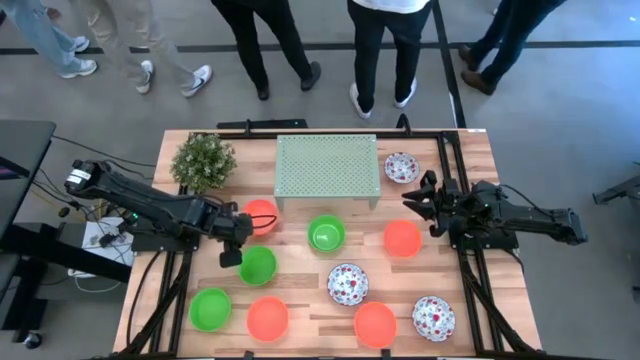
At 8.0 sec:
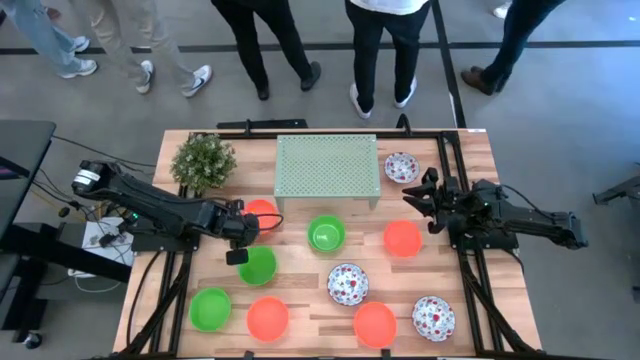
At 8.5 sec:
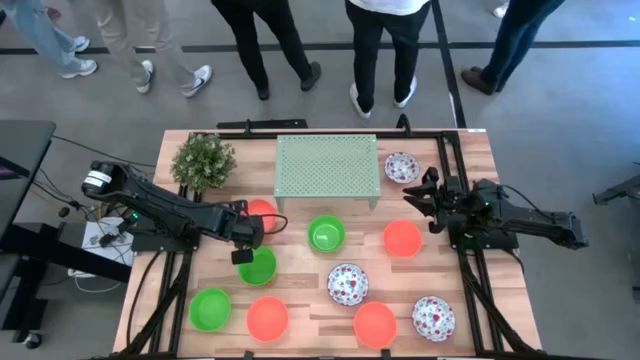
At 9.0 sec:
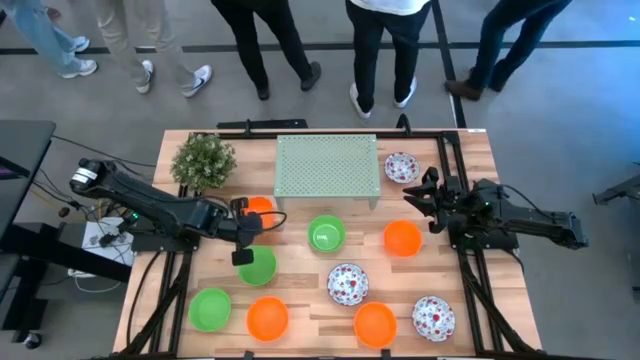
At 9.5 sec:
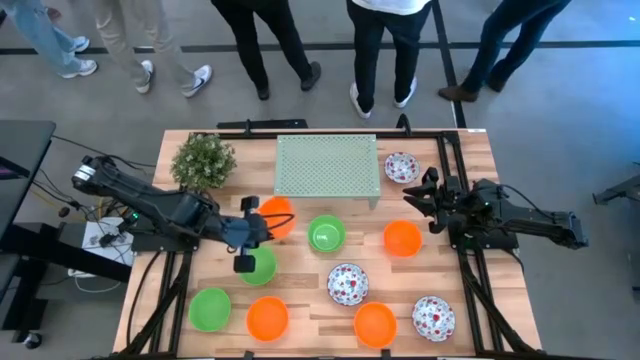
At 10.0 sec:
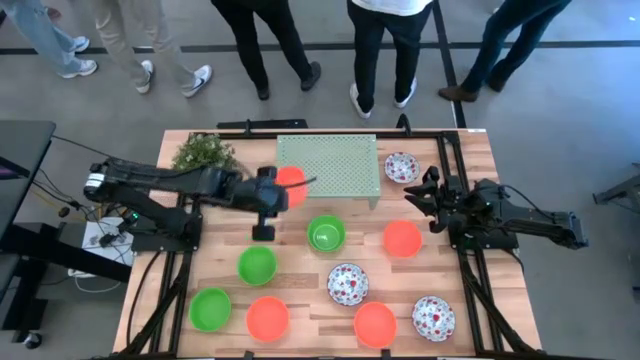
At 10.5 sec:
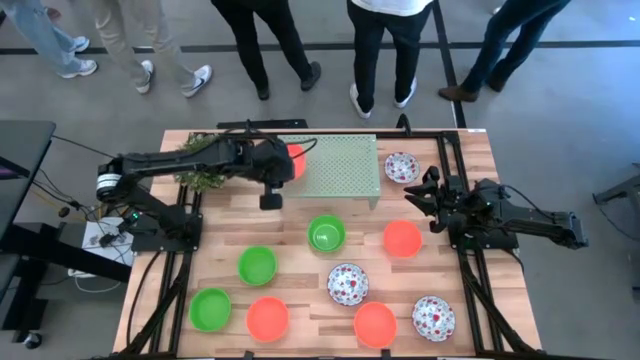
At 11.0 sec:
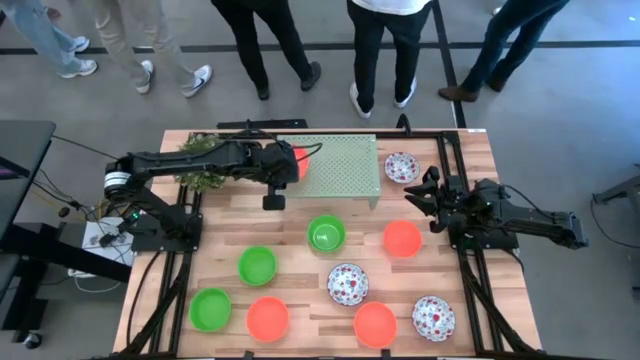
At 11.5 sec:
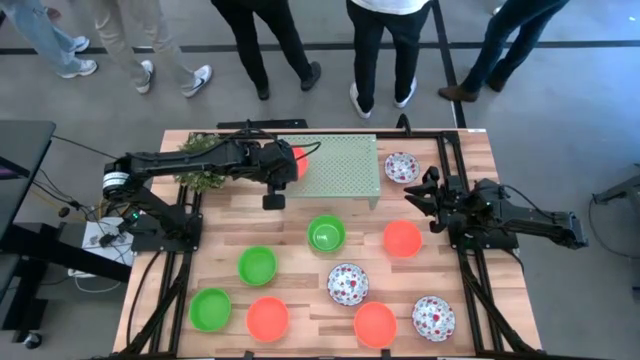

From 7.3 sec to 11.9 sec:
Task: Pick & Place Mini bowls
Put the orange bowl on the shelf

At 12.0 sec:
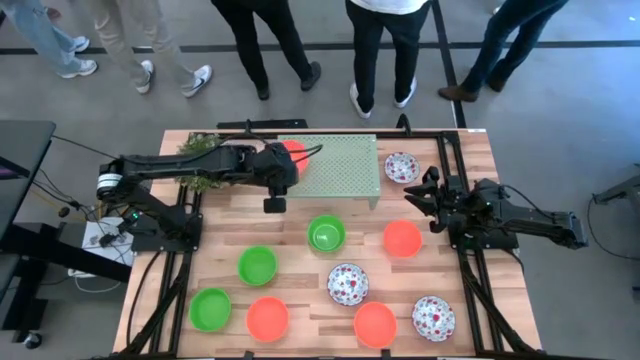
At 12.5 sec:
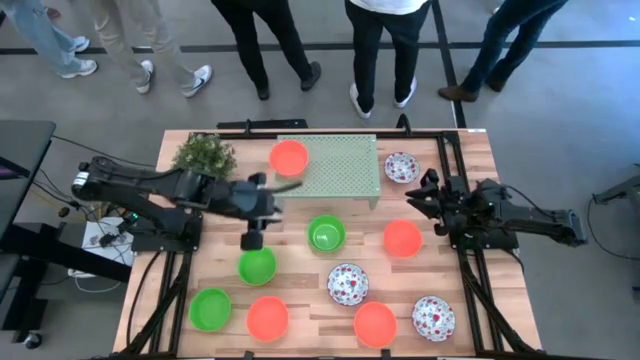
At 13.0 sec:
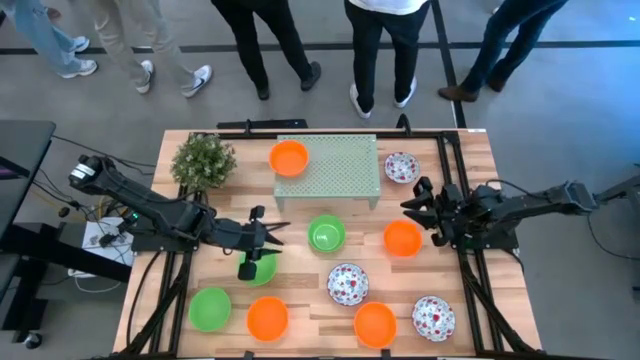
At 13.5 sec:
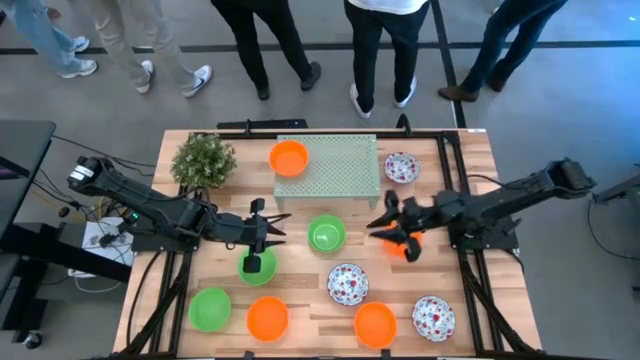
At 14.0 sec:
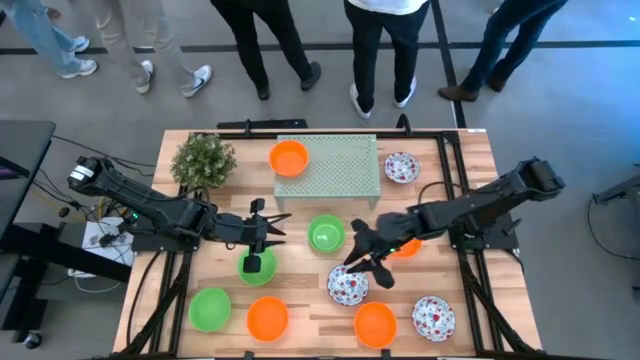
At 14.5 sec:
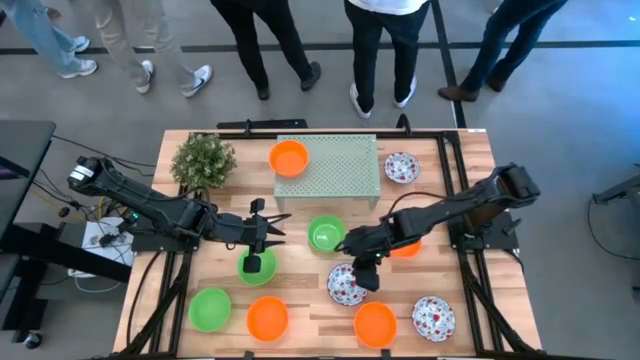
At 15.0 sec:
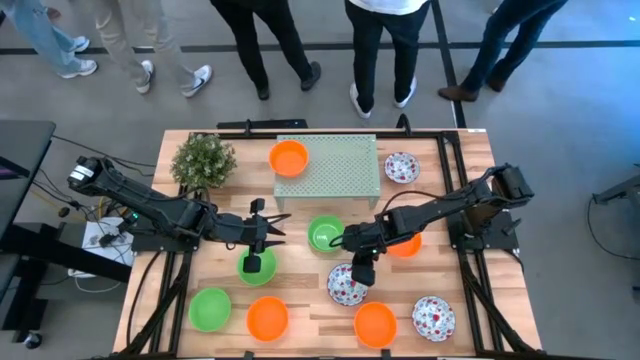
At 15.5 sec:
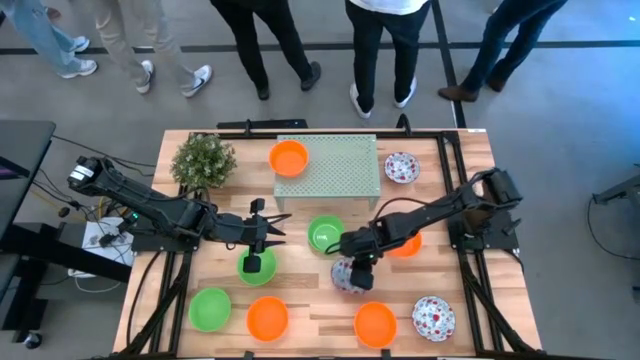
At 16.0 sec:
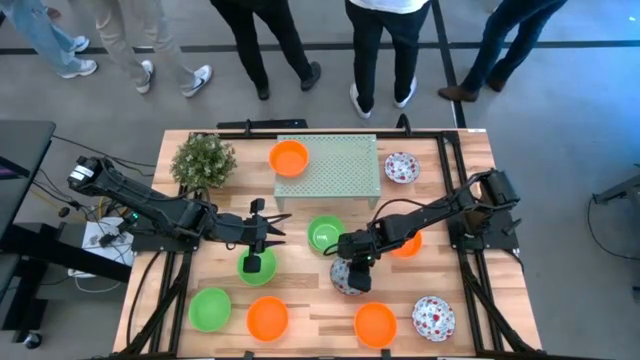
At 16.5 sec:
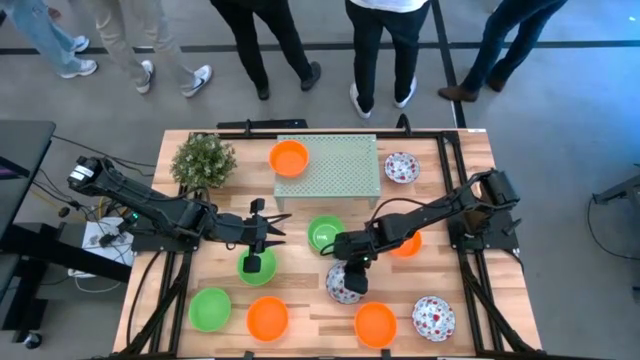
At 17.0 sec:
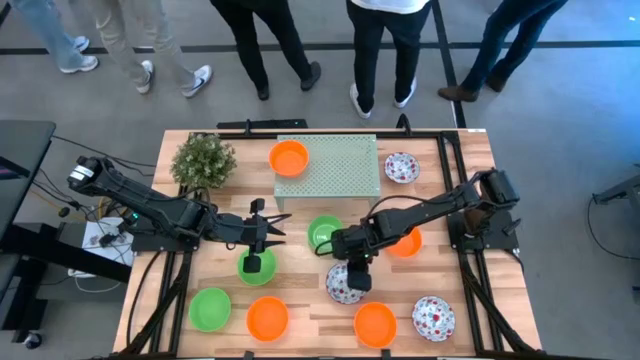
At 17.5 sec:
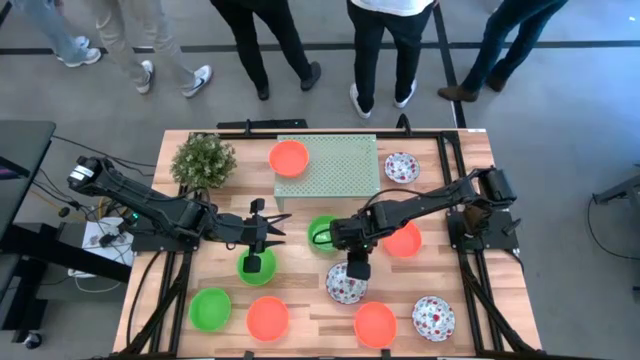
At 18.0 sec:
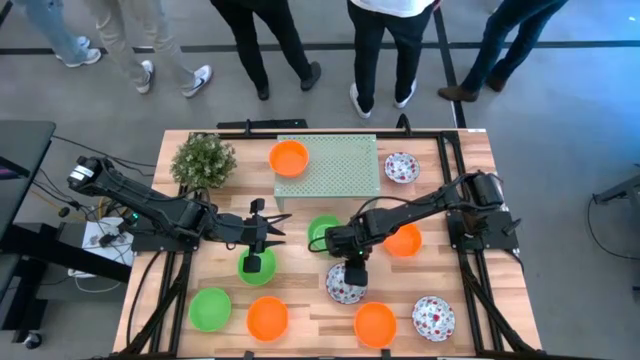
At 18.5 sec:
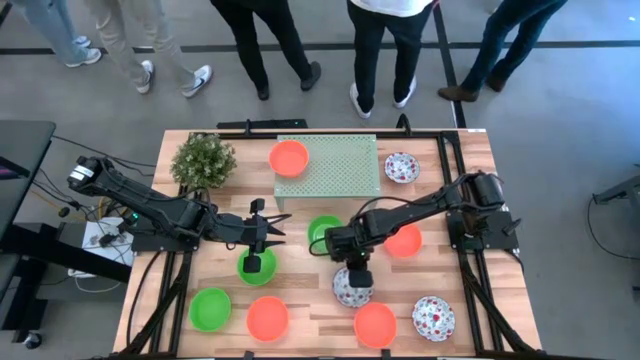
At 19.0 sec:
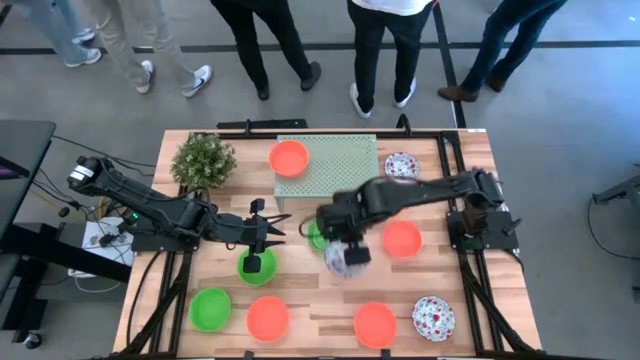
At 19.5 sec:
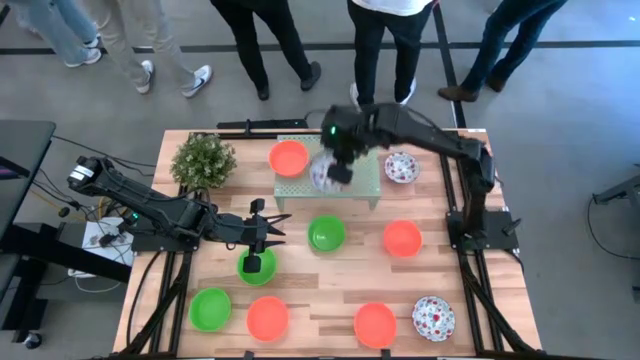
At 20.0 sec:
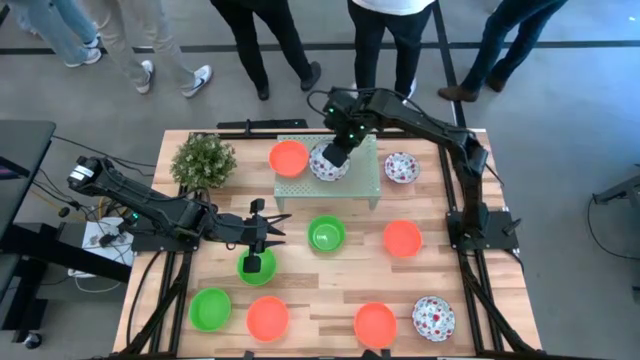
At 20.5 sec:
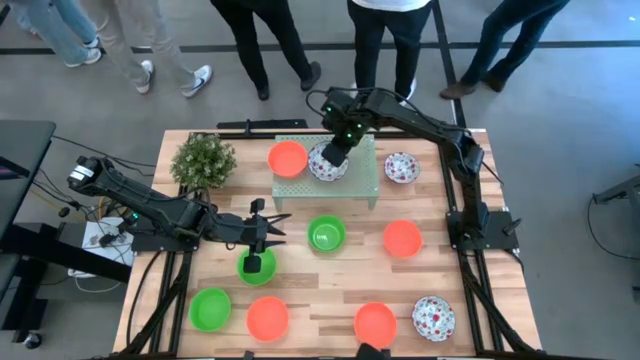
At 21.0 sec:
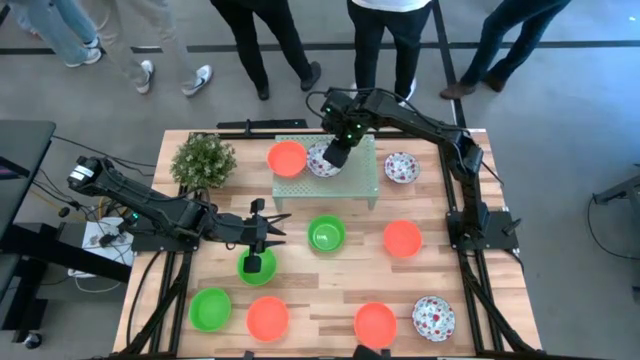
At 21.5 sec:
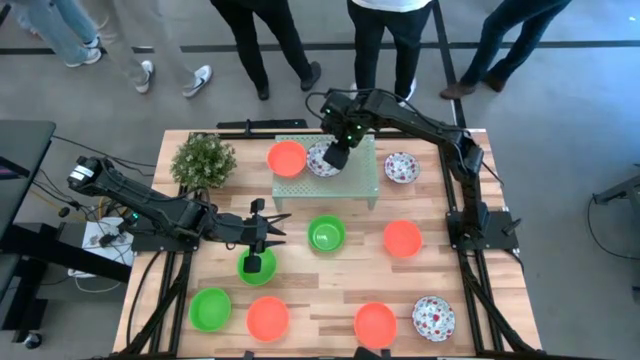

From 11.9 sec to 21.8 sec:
Put the left red patterned bowl on the shelf

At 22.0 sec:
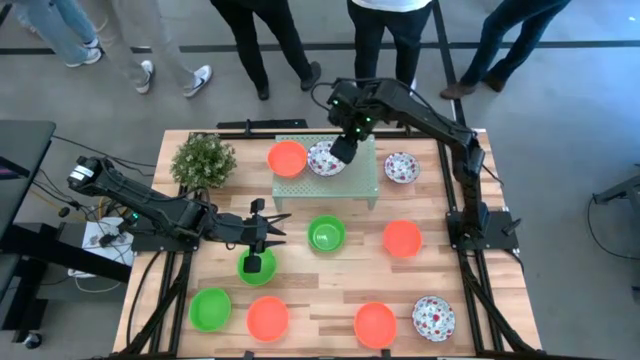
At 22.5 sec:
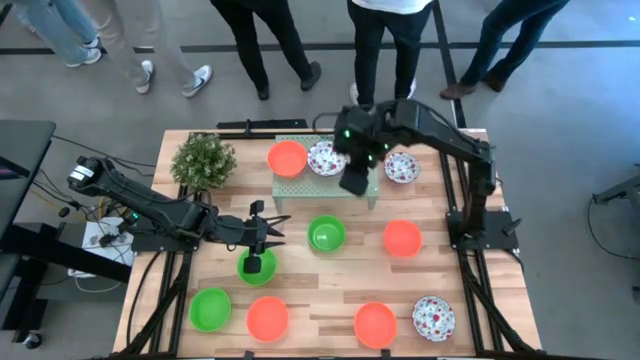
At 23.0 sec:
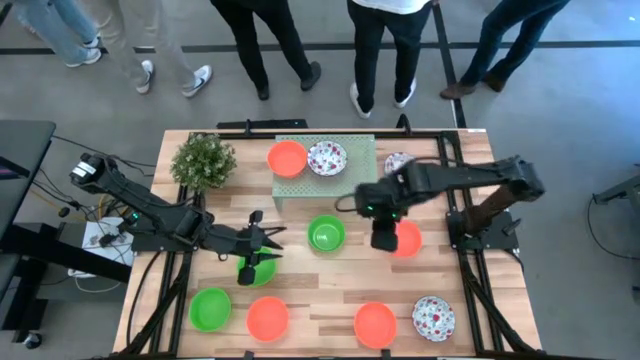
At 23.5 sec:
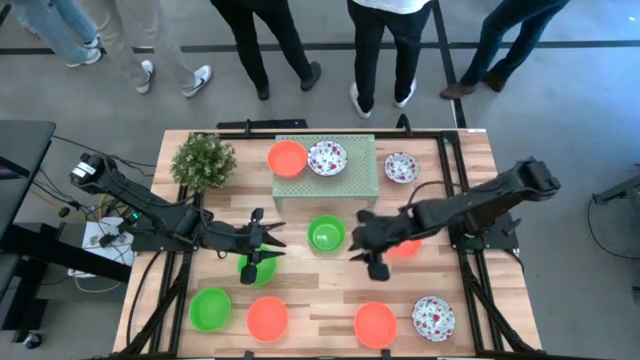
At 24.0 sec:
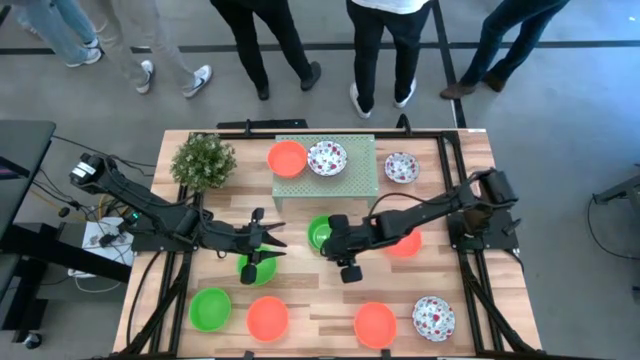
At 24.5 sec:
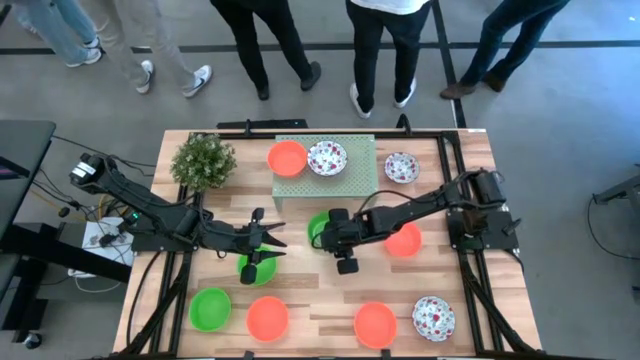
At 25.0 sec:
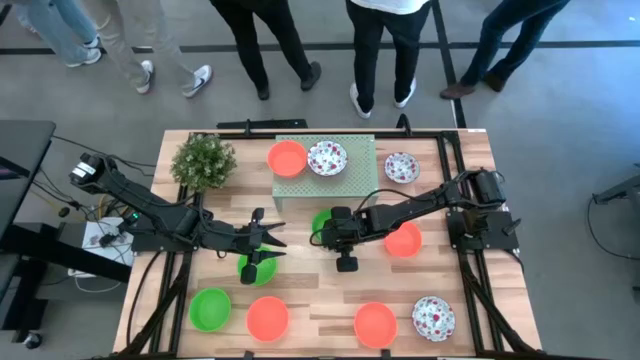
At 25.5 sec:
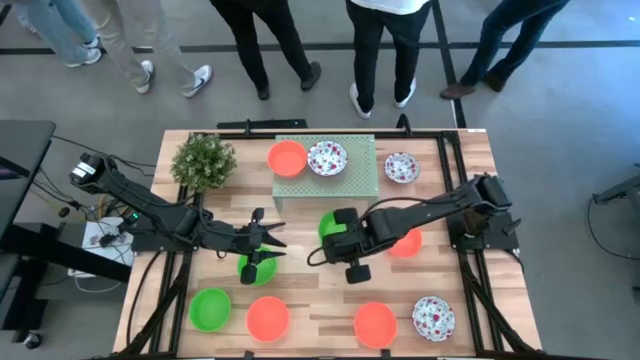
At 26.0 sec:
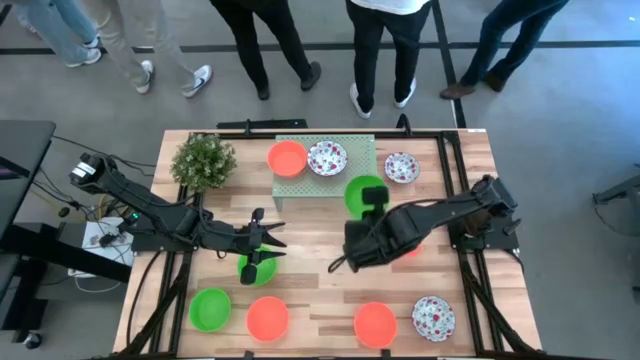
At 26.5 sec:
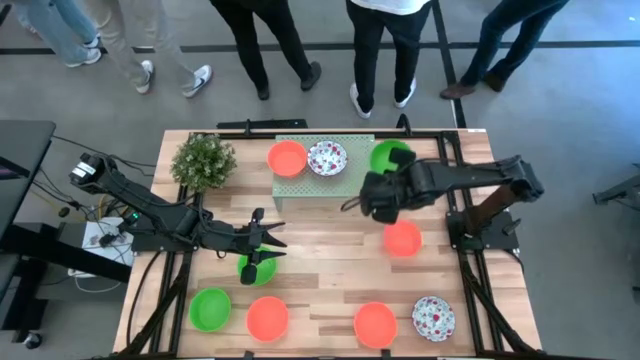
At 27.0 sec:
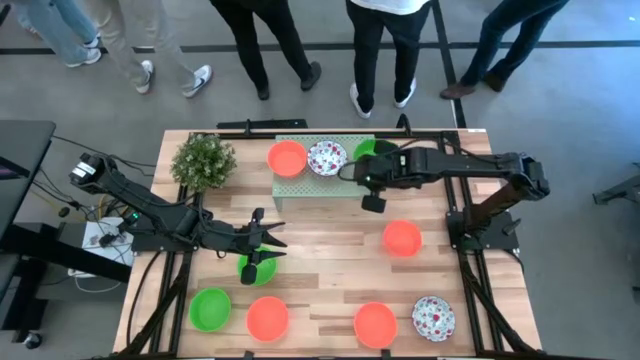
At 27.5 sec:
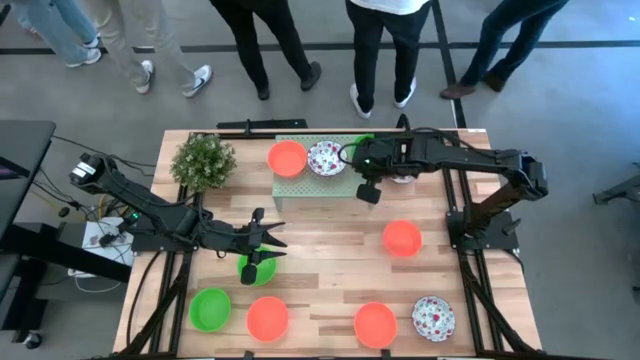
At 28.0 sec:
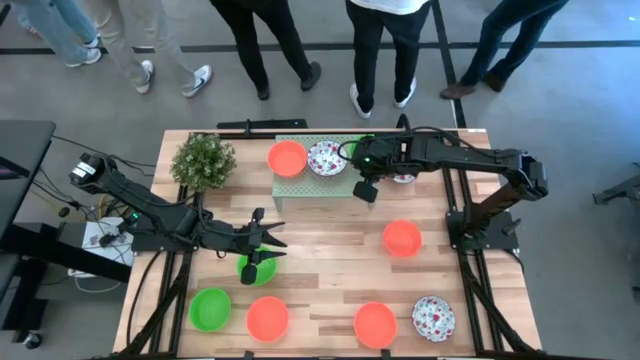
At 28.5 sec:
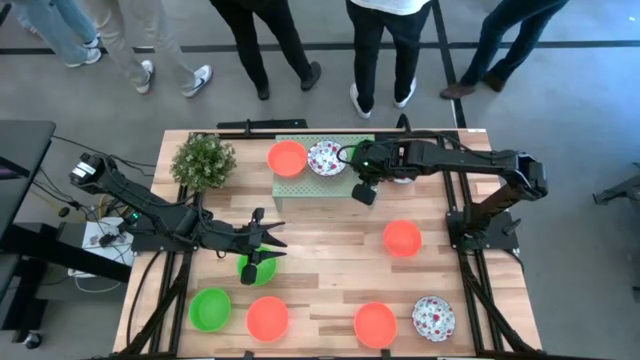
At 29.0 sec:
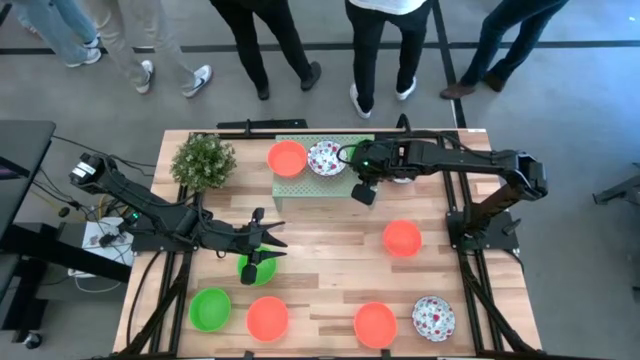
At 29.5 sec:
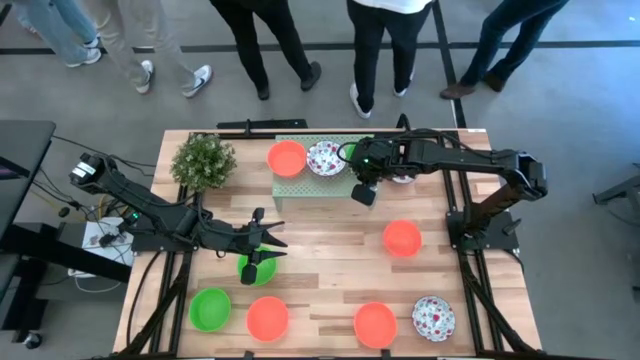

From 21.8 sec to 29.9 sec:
Put the top right green bowl on the shelf
